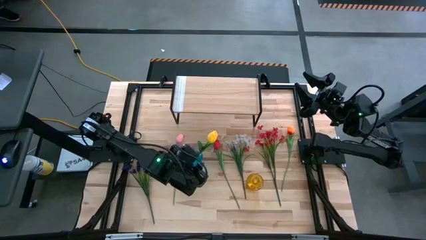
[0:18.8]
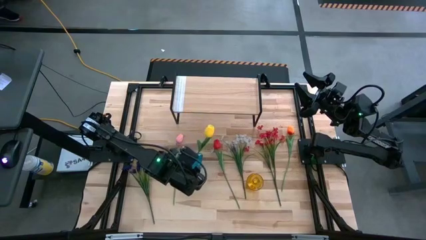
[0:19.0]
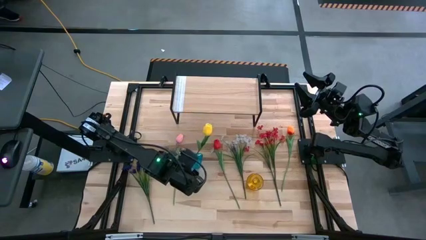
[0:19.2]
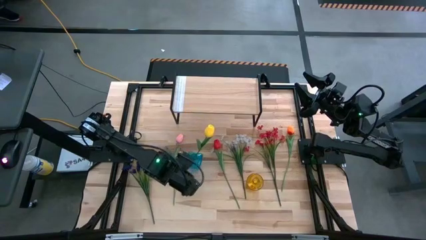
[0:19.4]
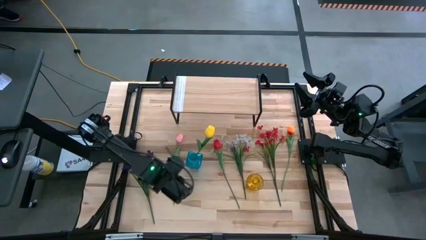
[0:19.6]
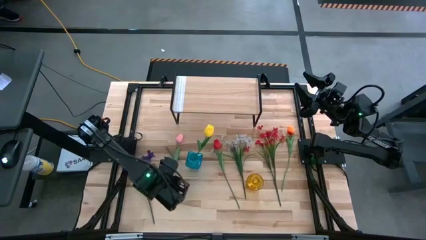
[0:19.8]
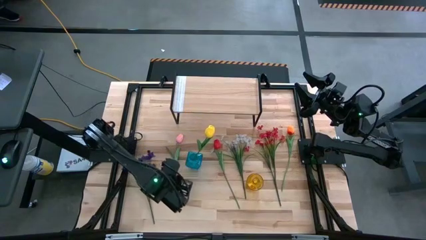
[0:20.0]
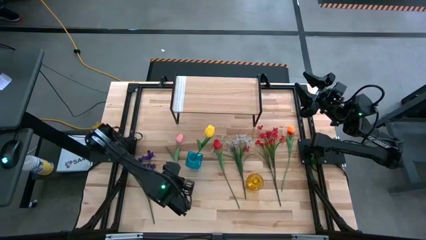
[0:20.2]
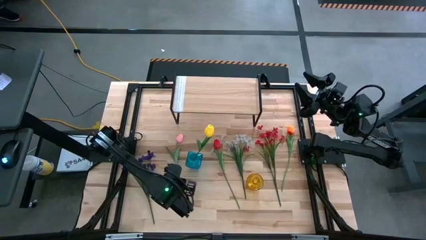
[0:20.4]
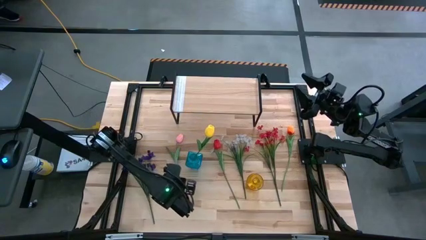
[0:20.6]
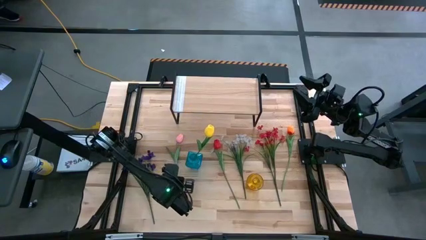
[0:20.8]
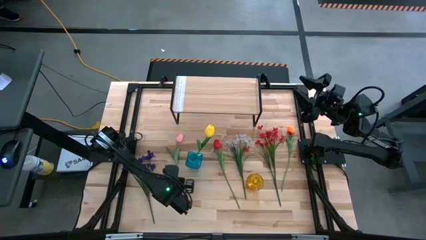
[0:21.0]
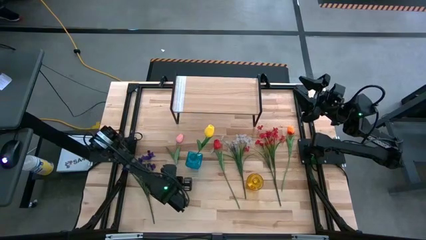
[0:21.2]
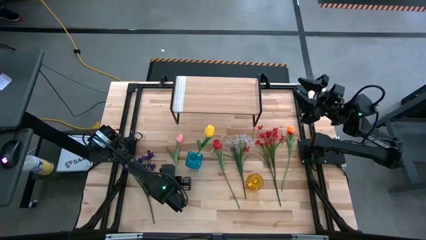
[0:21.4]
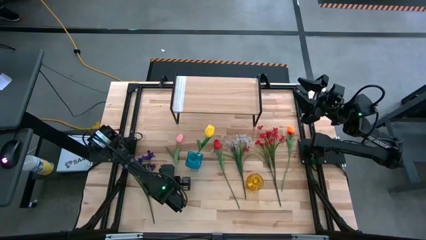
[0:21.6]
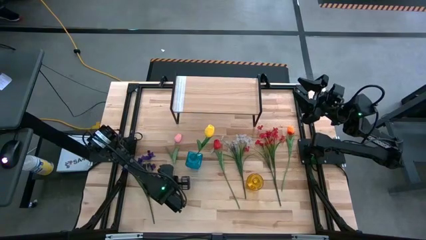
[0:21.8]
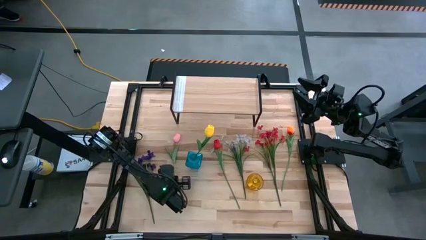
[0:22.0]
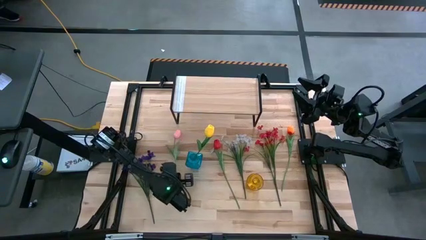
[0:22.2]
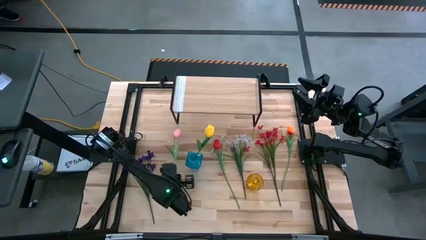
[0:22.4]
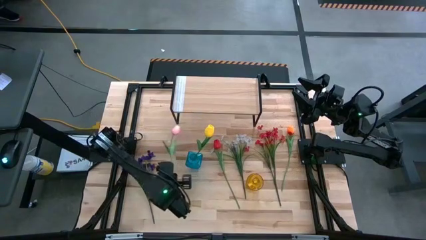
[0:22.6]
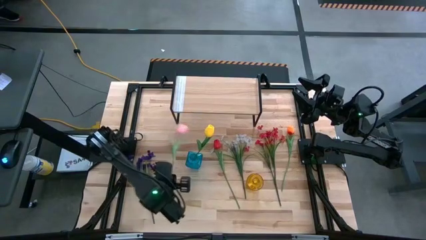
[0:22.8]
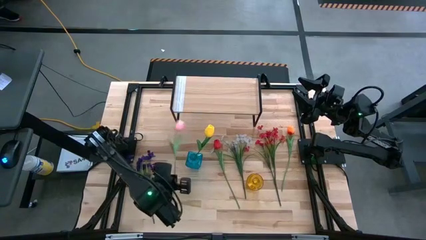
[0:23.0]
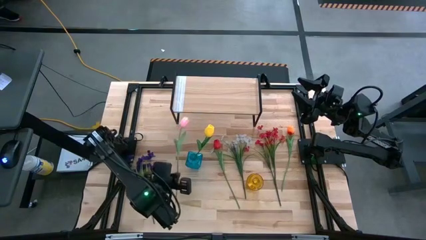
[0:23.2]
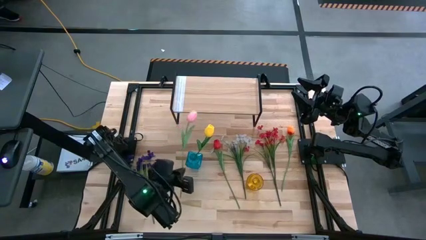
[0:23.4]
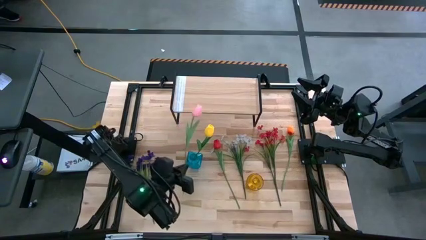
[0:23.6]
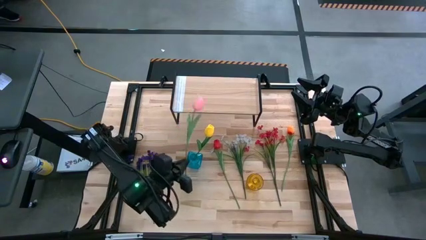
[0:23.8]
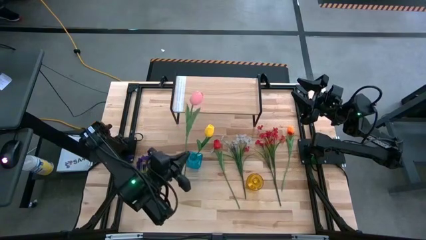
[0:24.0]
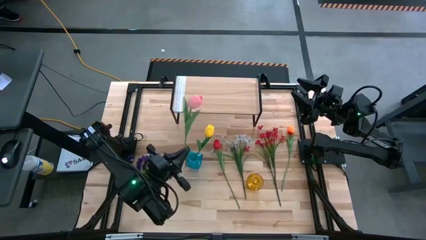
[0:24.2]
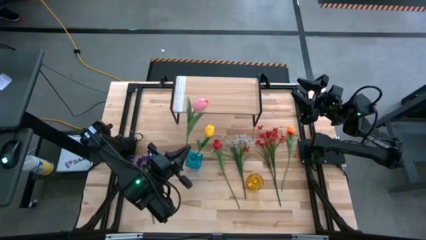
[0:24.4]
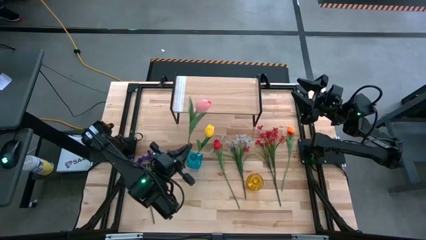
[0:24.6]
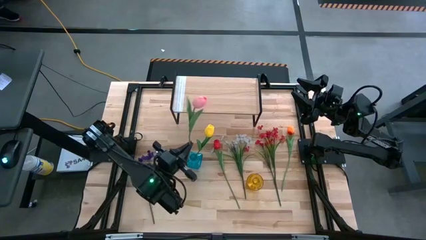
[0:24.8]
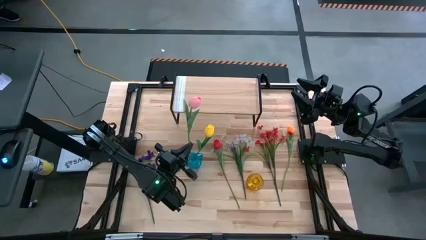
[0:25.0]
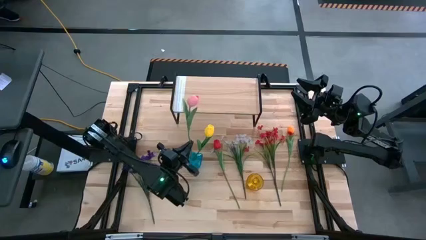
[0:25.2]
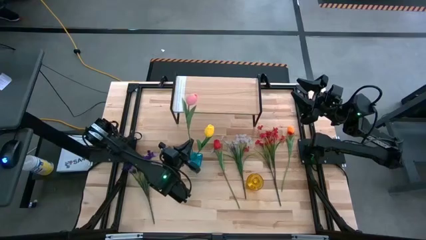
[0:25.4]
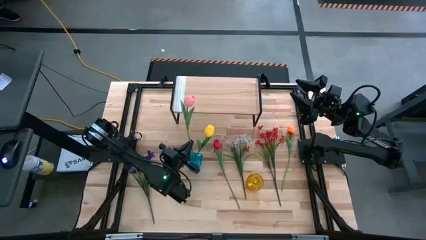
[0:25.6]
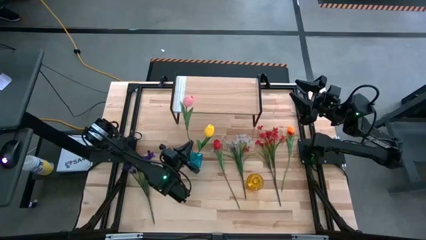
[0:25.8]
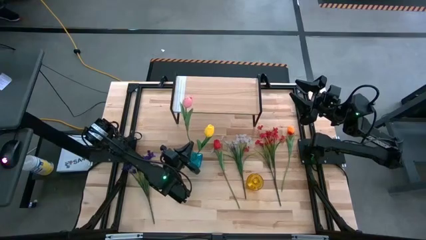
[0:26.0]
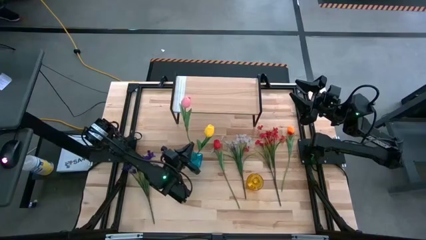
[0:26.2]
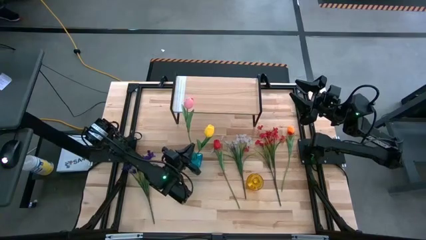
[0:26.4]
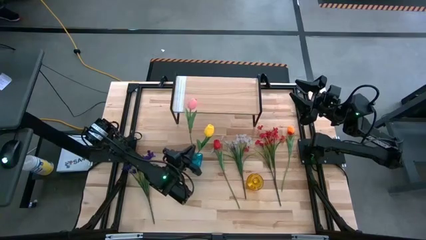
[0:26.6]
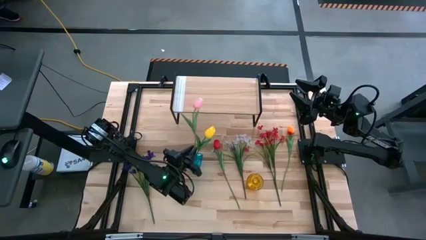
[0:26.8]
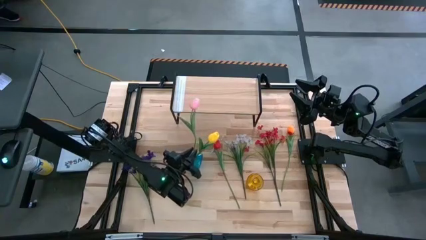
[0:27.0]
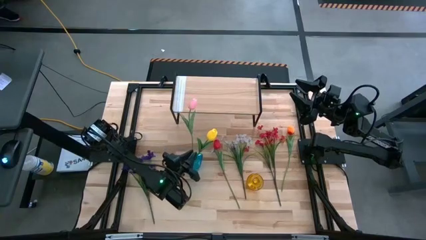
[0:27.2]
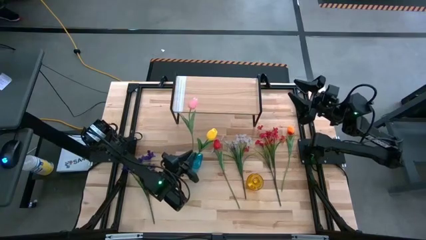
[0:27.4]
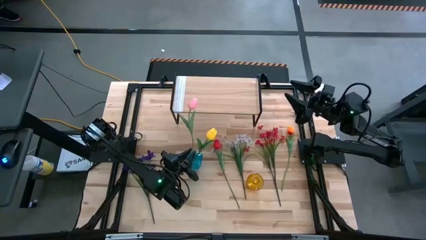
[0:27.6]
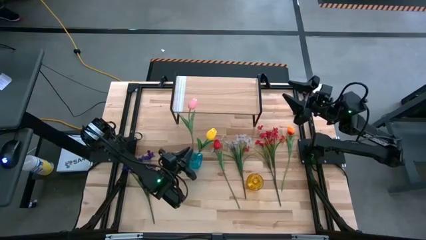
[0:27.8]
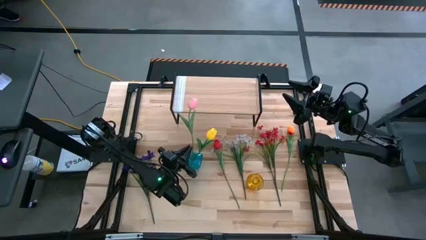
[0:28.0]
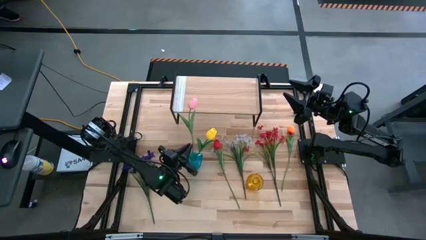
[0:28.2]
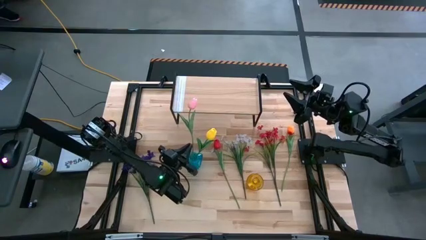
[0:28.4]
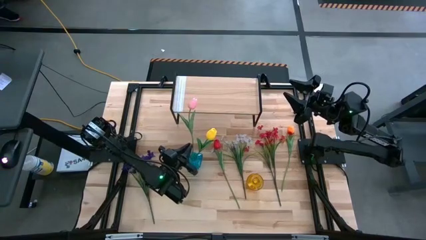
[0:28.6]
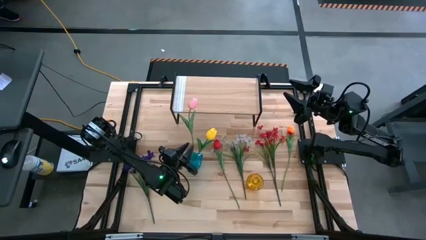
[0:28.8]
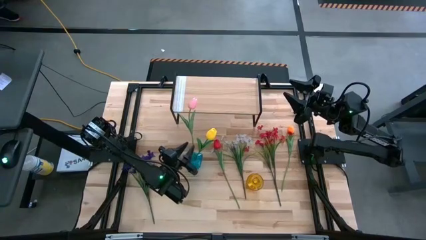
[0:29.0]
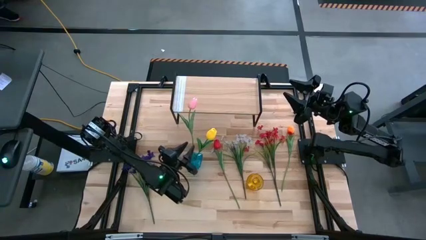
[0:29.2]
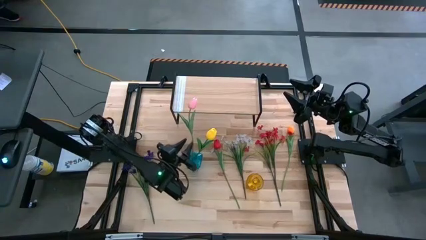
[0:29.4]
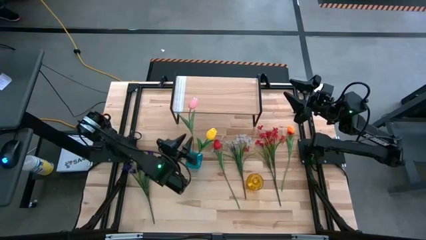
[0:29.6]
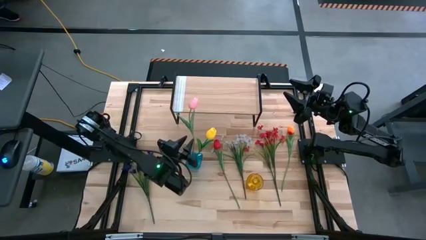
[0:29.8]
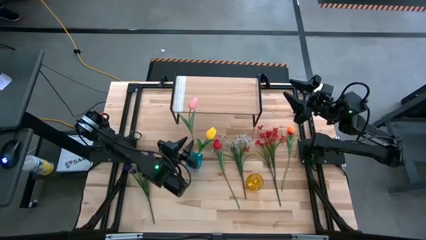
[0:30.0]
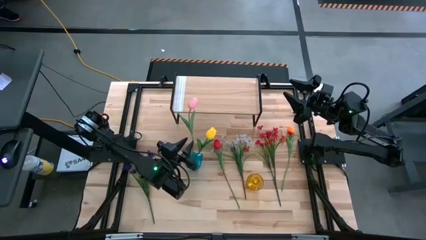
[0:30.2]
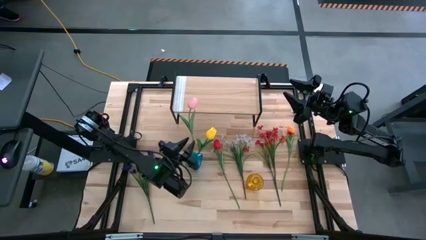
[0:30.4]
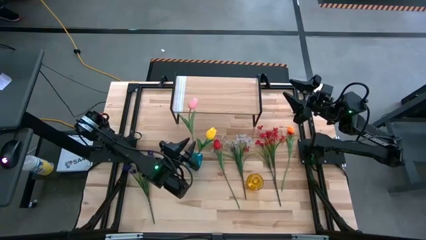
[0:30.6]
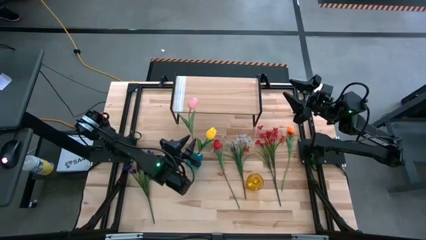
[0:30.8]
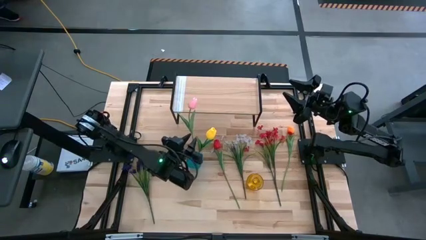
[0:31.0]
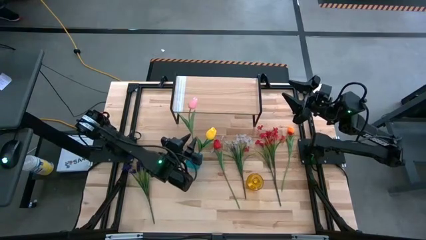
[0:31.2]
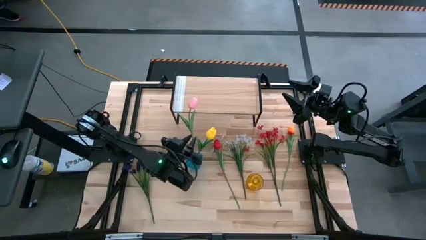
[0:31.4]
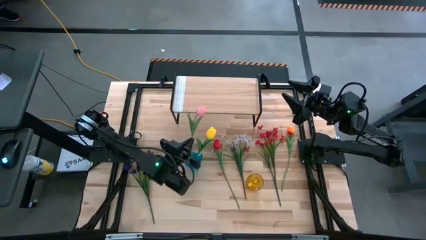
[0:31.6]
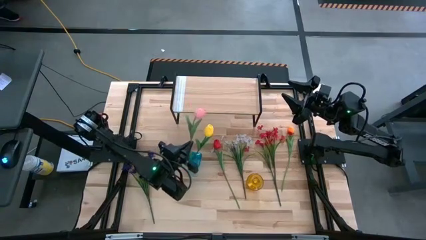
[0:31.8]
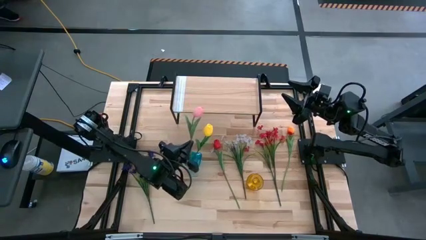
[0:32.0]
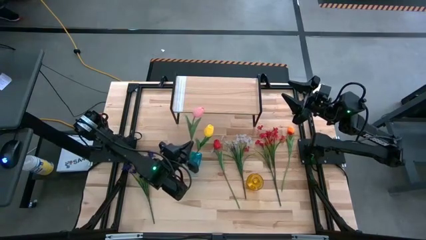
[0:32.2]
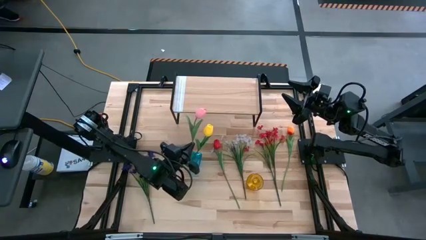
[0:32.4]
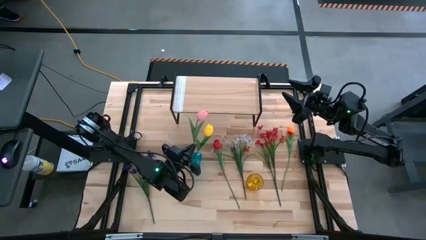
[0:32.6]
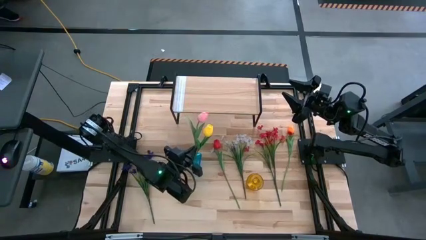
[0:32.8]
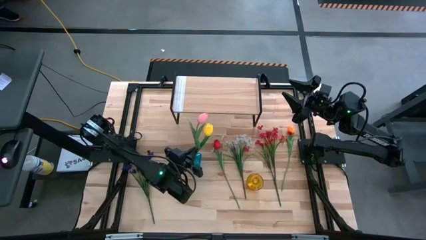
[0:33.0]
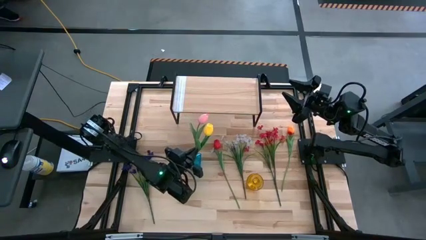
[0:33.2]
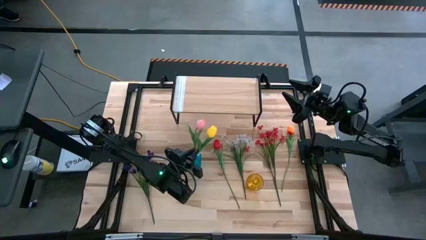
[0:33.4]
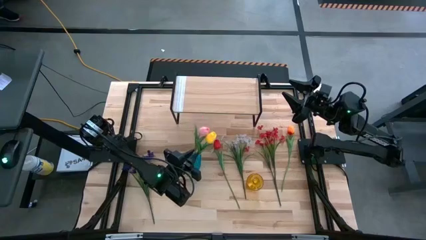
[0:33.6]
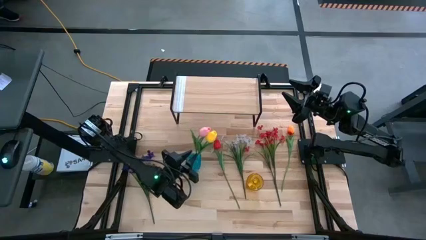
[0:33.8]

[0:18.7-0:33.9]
Task: Pick and place flowers into a vace then onto a shelf
Put the pink flower into the blue vase
